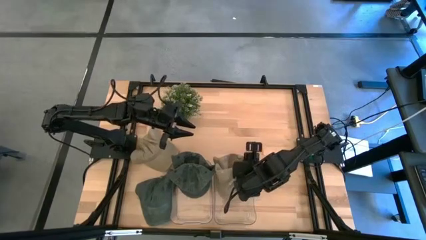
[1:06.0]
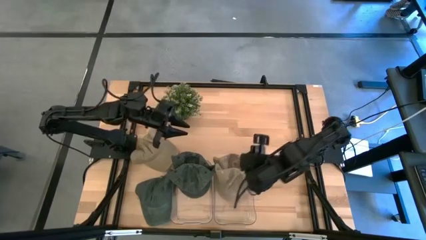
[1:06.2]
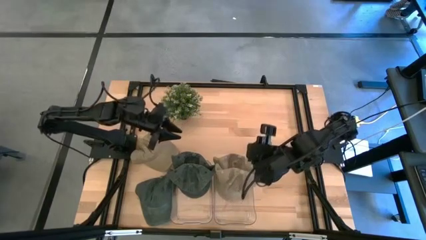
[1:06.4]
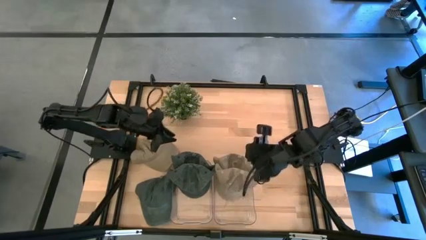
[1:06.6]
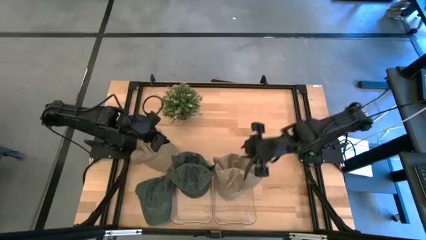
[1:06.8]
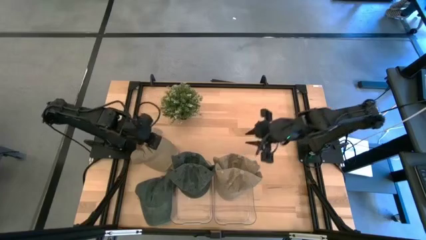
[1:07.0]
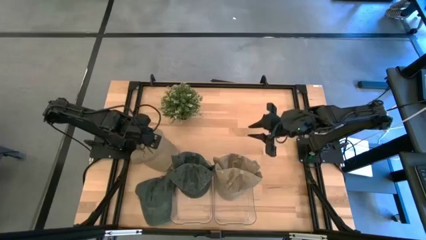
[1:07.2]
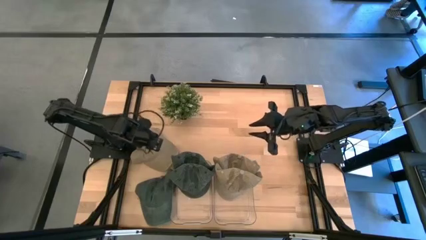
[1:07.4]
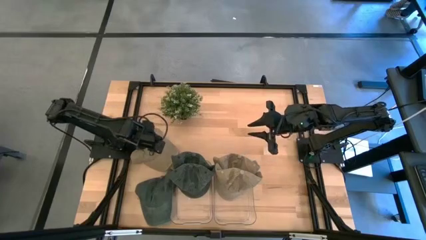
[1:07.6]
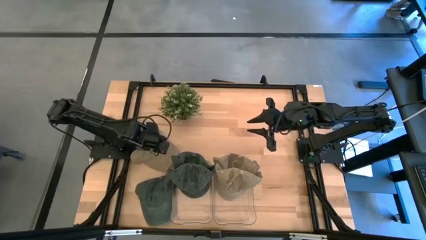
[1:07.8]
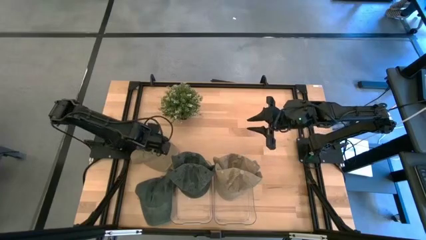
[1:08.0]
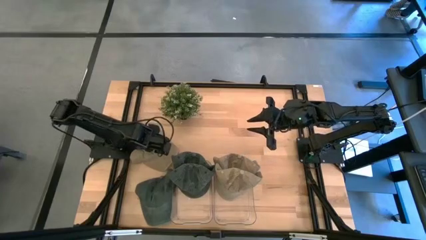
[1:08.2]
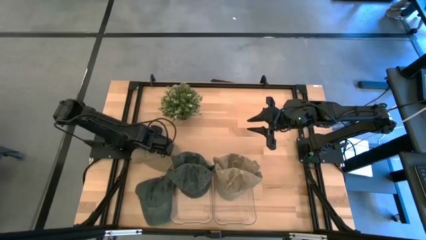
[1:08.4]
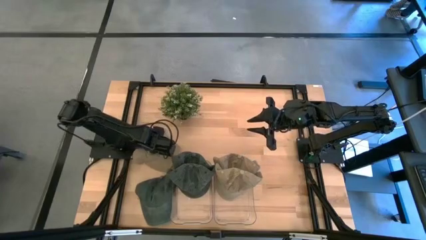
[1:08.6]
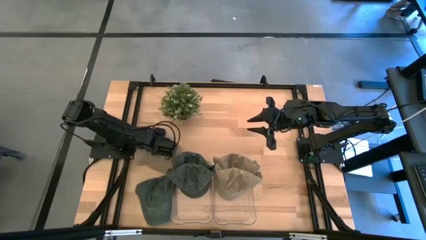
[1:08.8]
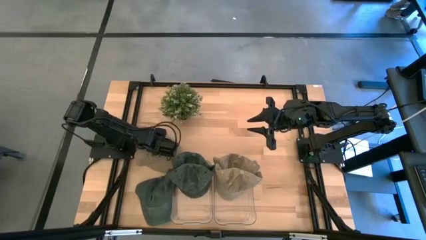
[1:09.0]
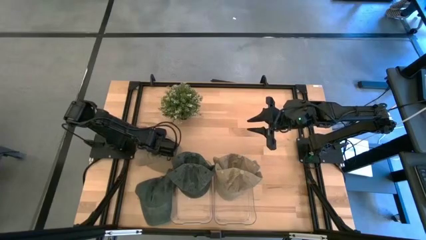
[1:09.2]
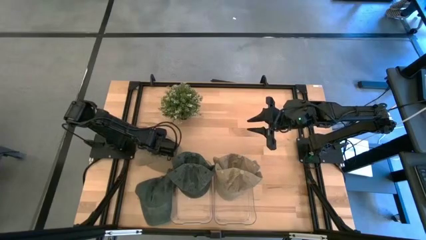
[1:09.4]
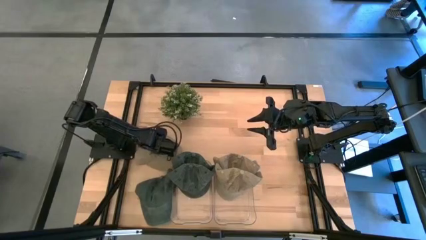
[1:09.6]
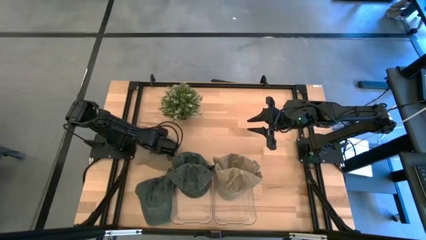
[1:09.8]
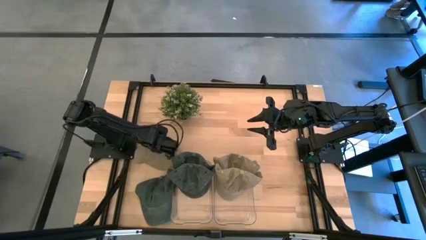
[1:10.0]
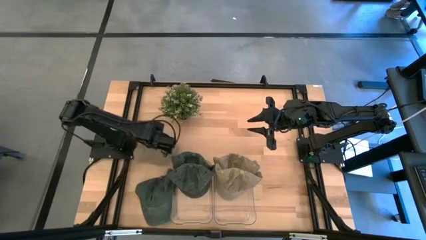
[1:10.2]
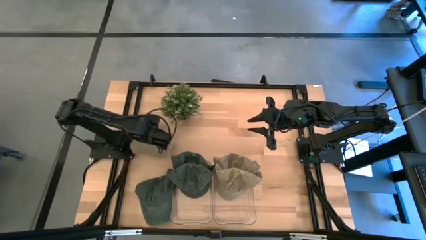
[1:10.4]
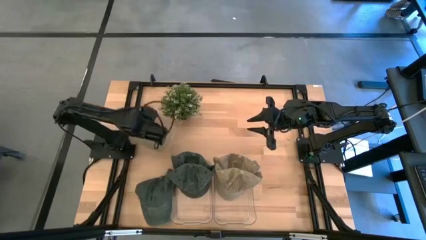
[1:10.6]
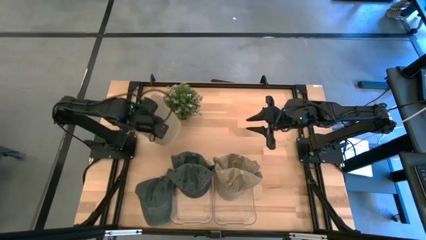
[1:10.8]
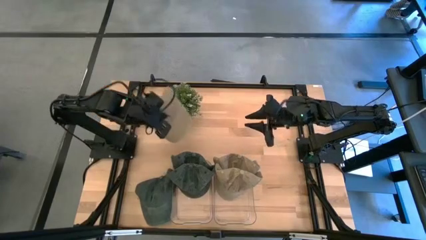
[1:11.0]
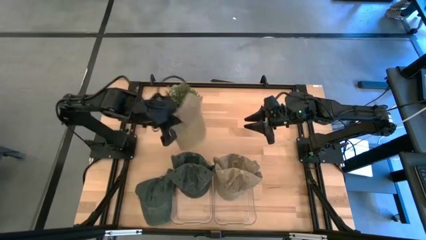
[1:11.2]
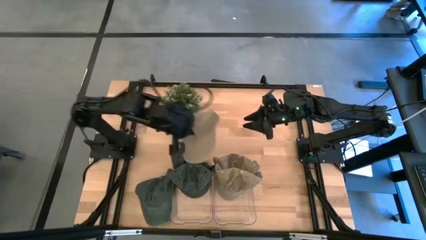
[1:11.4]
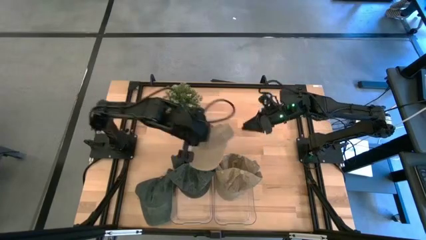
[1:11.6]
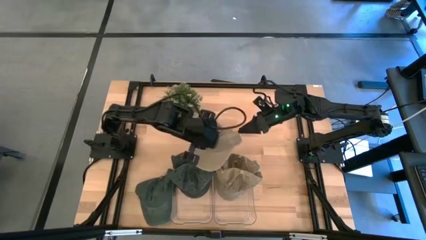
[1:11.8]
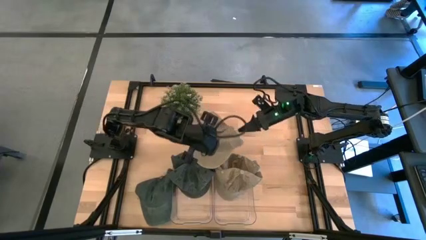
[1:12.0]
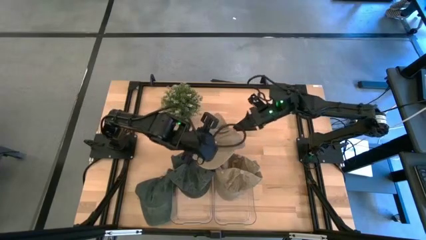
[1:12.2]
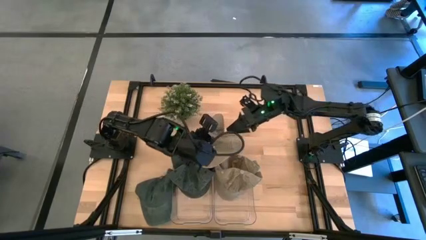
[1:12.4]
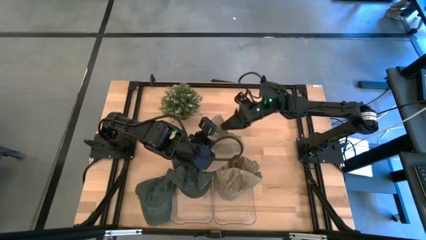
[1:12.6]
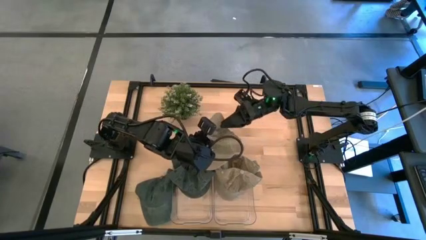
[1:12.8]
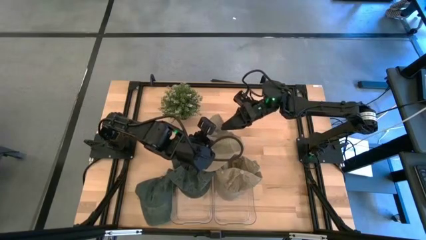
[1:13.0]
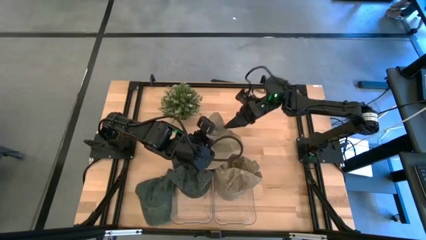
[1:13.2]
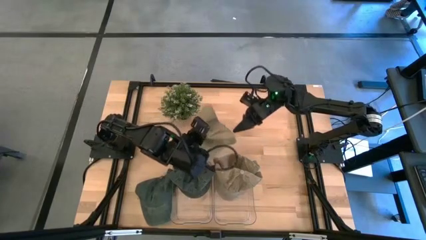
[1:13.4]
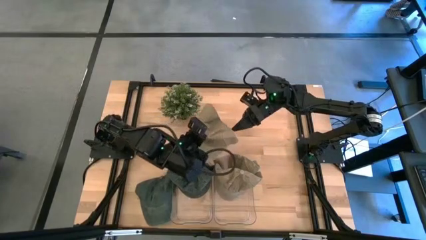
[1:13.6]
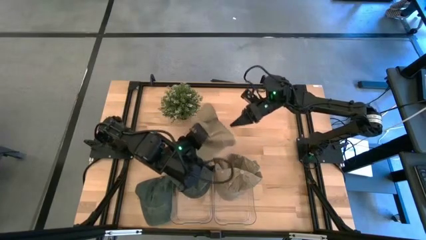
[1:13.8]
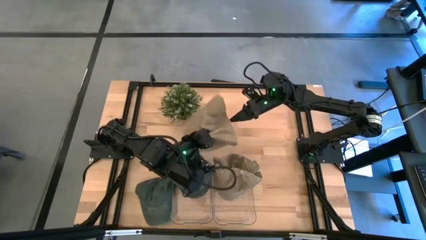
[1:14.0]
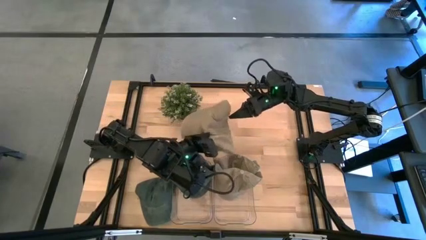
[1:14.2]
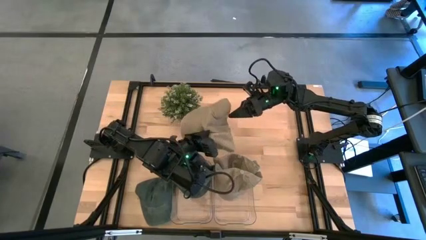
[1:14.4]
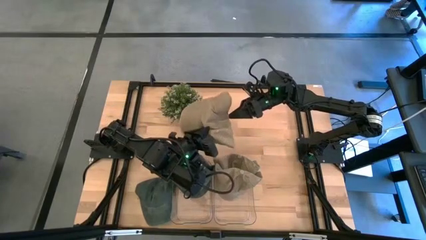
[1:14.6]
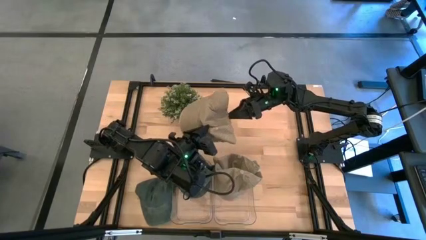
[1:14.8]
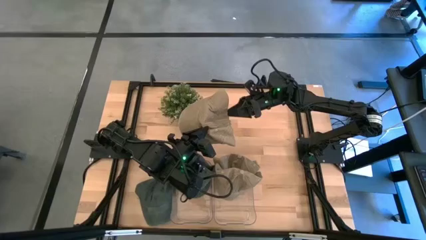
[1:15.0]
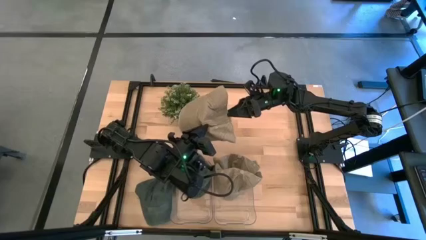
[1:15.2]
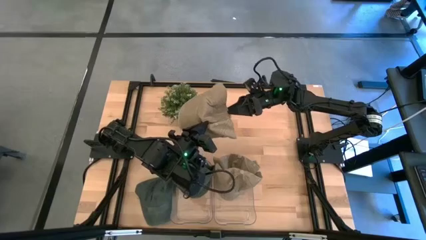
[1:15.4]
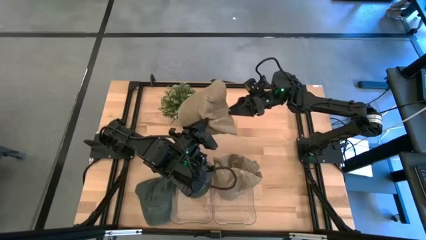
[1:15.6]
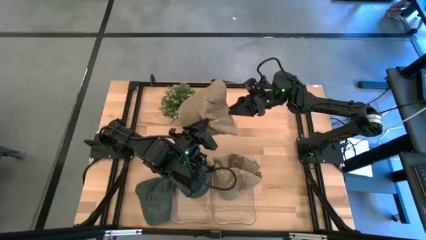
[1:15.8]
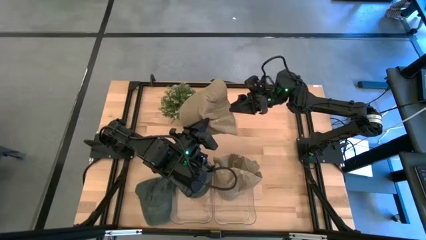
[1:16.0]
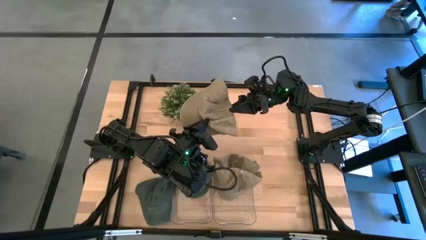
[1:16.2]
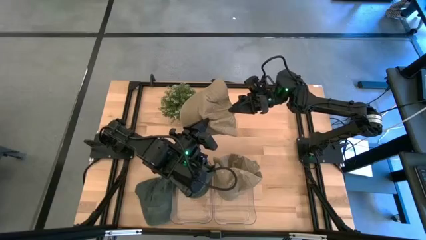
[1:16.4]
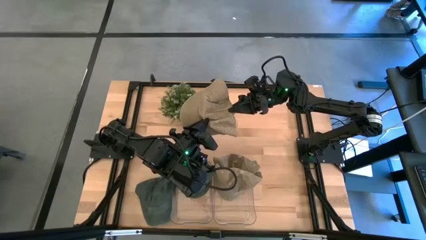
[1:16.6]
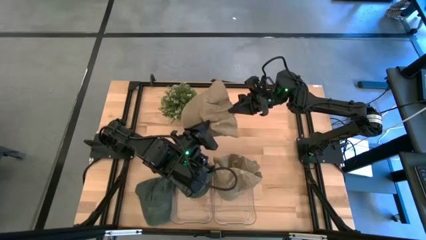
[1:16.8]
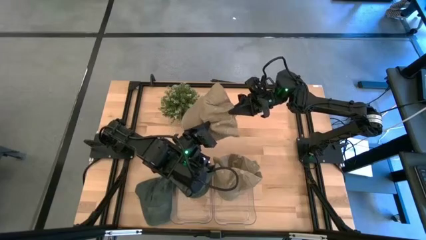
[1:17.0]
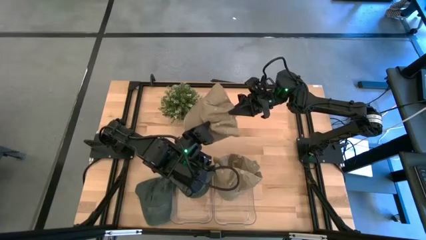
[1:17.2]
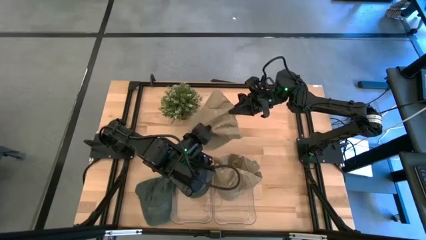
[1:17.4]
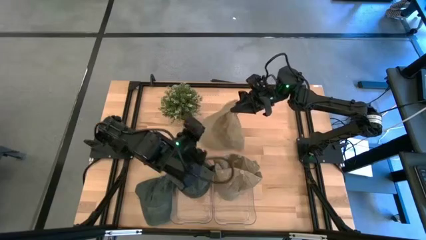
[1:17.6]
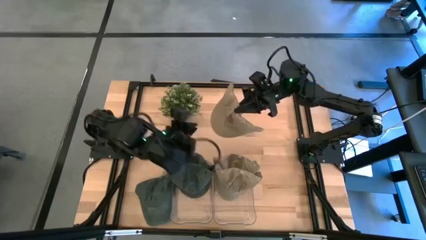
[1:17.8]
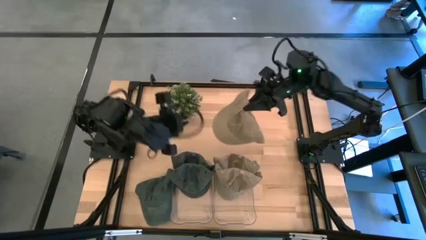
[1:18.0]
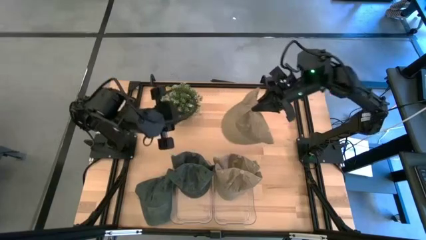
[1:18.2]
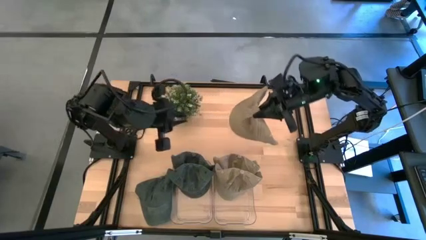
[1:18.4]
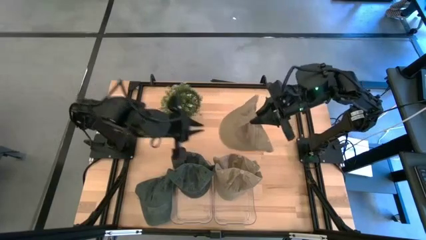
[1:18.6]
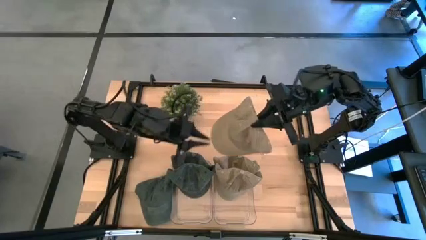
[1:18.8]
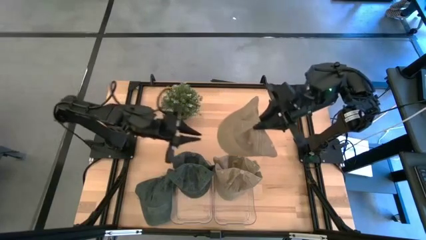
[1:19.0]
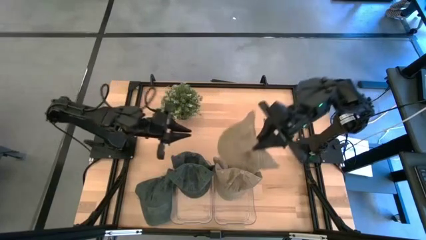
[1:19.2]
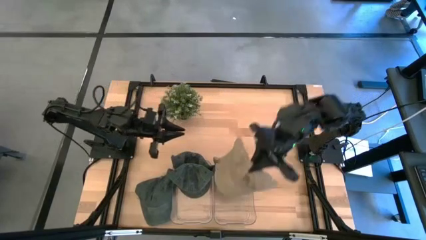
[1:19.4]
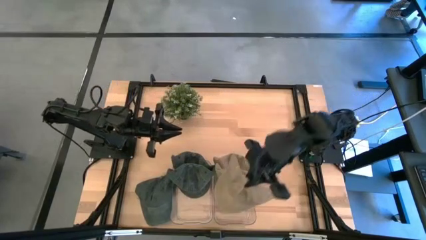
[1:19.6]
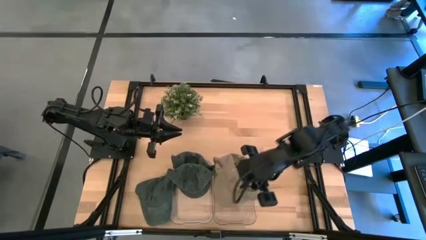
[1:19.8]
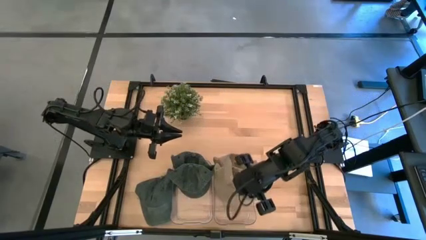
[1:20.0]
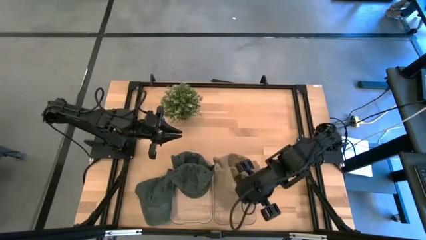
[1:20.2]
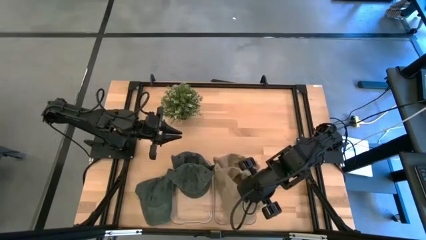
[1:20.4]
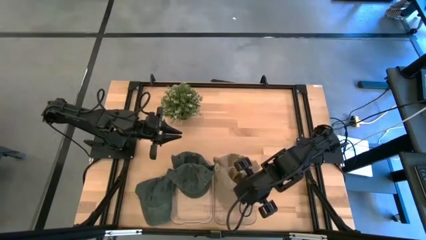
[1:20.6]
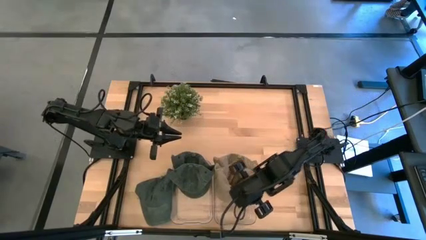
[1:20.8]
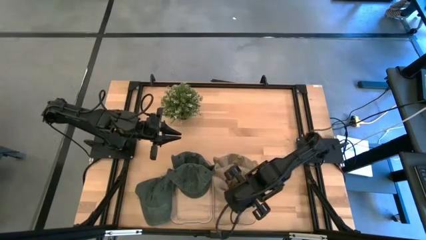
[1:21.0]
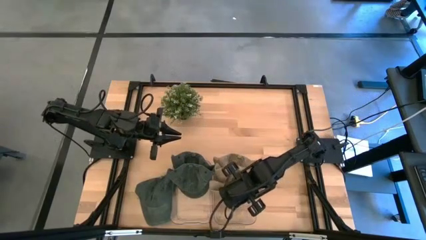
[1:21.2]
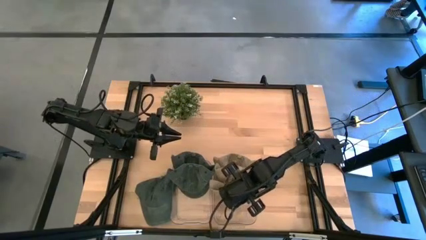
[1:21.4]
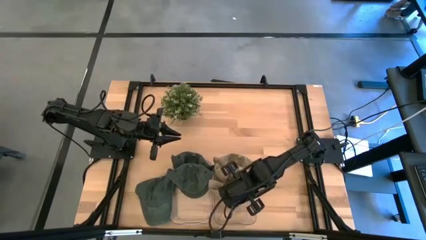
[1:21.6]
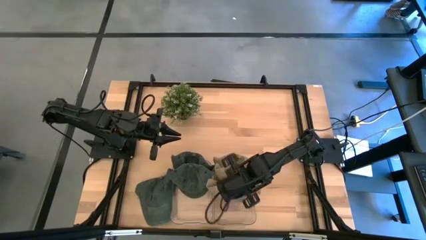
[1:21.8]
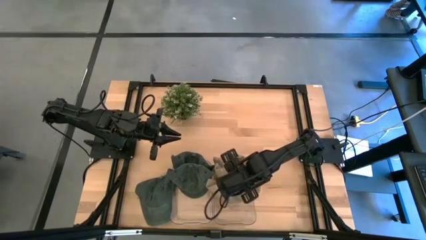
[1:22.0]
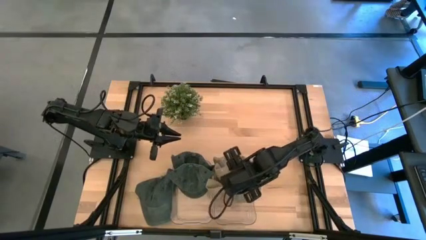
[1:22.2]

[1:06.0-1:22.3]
Task: Pick & Place hat
Put the brown cap into the right transparent bin
